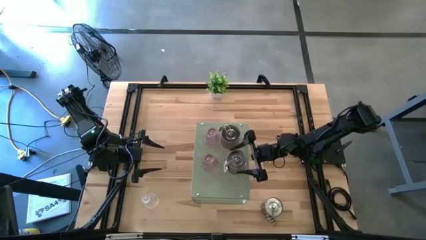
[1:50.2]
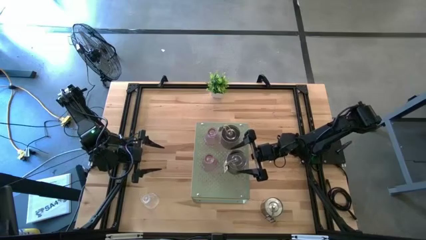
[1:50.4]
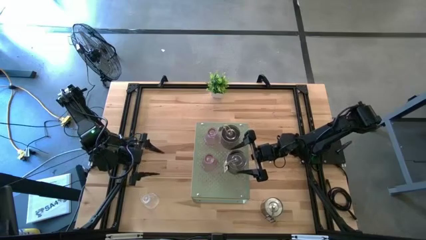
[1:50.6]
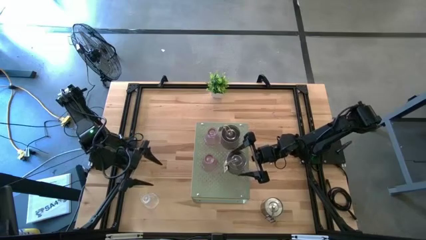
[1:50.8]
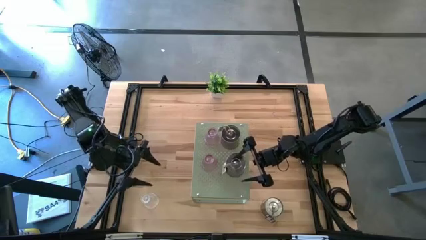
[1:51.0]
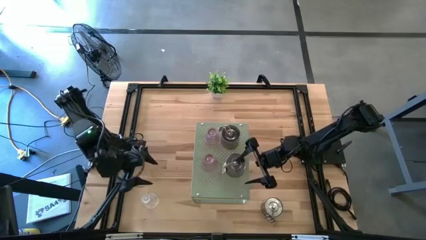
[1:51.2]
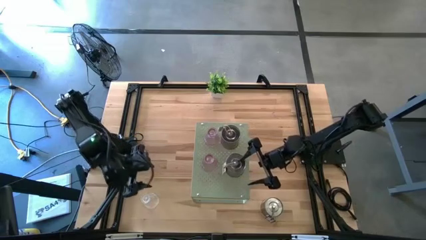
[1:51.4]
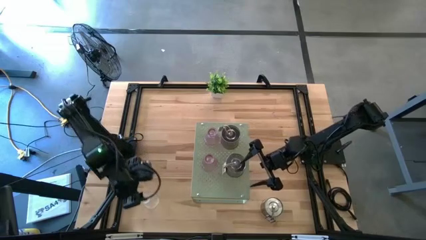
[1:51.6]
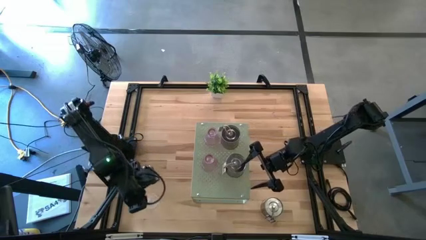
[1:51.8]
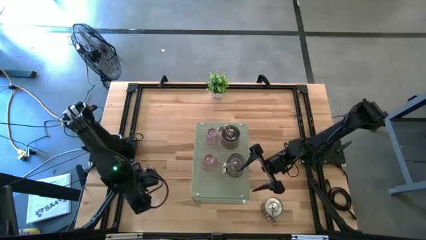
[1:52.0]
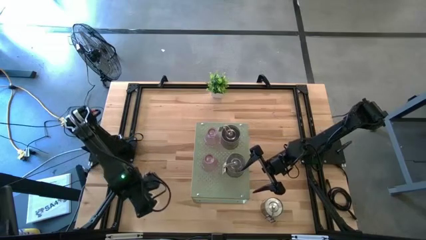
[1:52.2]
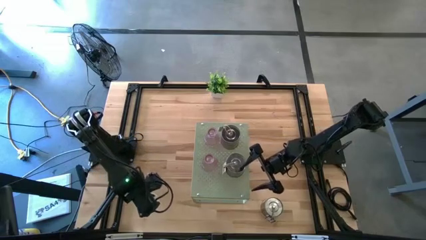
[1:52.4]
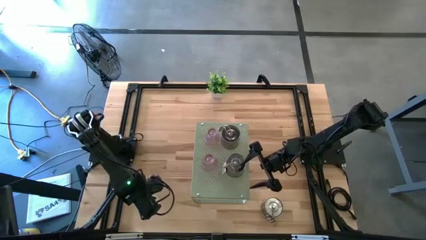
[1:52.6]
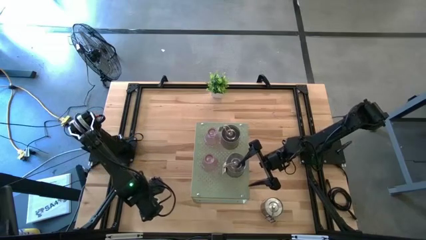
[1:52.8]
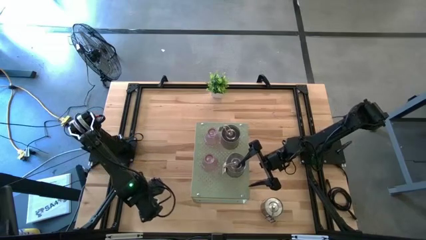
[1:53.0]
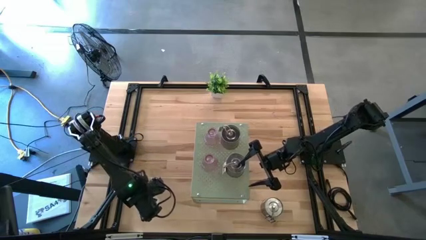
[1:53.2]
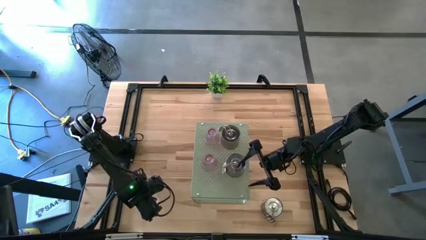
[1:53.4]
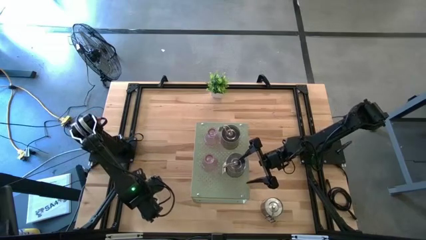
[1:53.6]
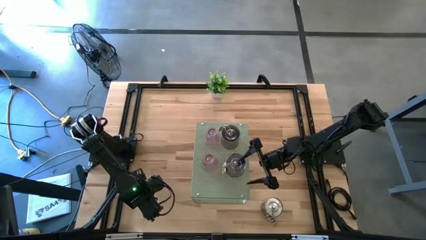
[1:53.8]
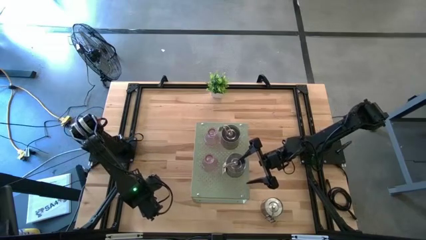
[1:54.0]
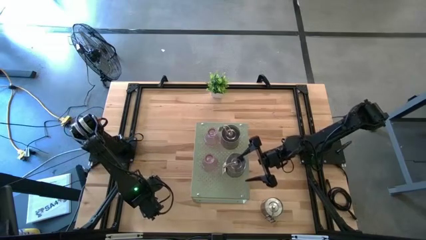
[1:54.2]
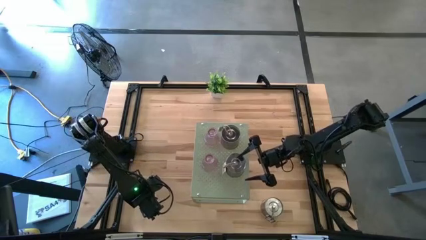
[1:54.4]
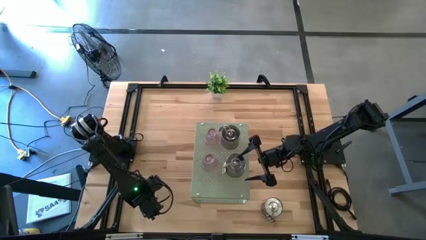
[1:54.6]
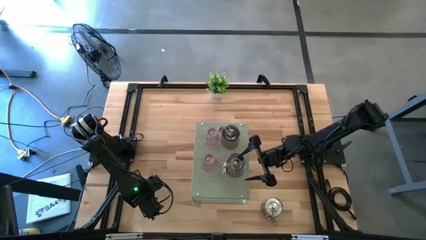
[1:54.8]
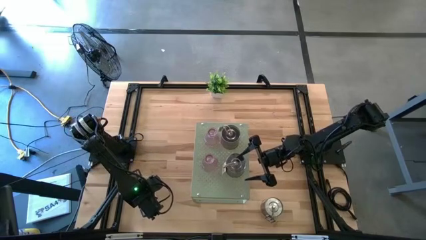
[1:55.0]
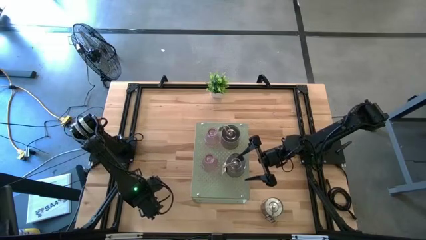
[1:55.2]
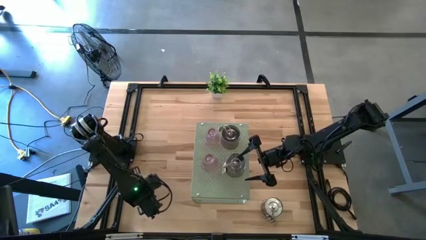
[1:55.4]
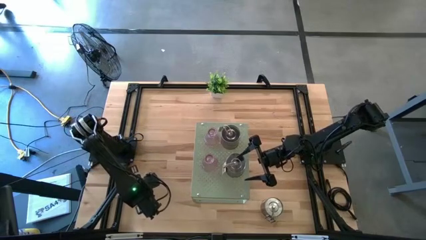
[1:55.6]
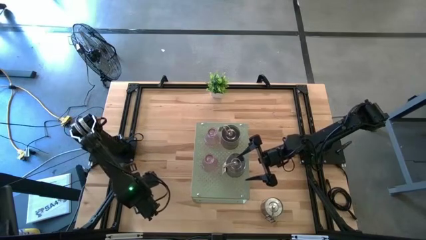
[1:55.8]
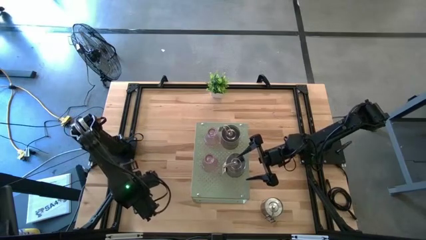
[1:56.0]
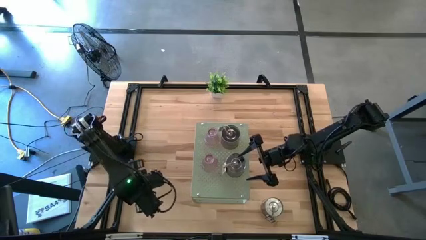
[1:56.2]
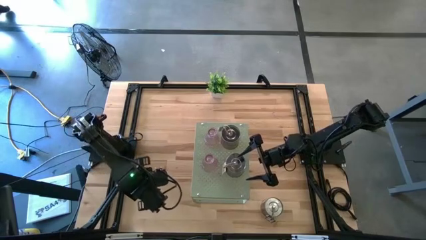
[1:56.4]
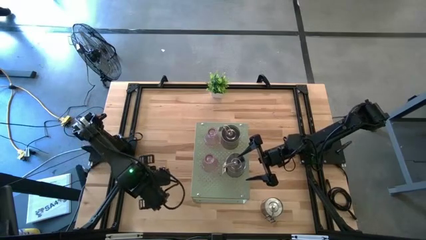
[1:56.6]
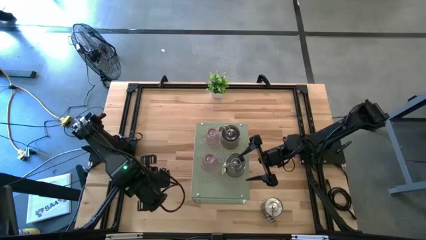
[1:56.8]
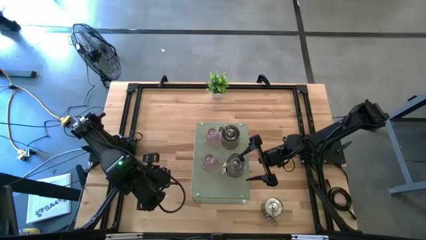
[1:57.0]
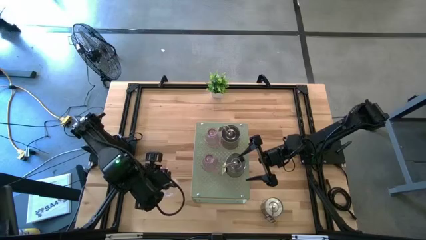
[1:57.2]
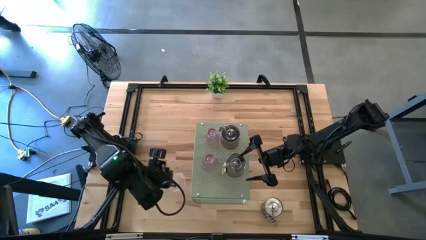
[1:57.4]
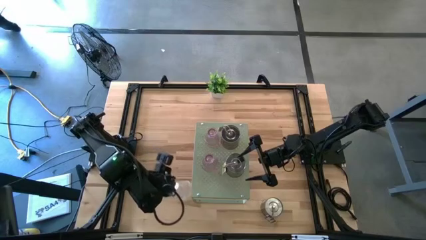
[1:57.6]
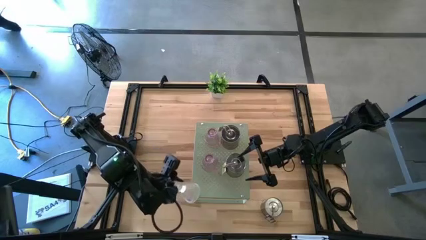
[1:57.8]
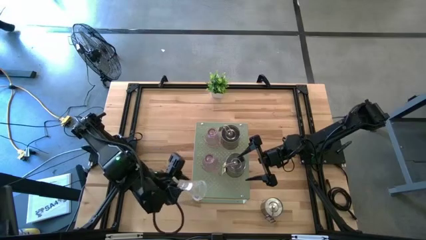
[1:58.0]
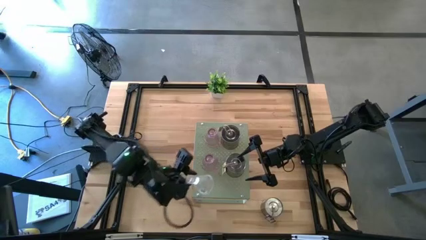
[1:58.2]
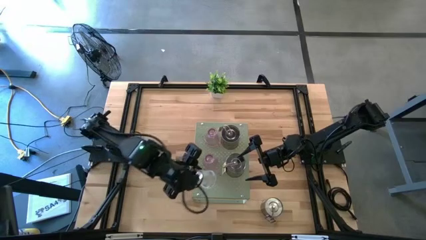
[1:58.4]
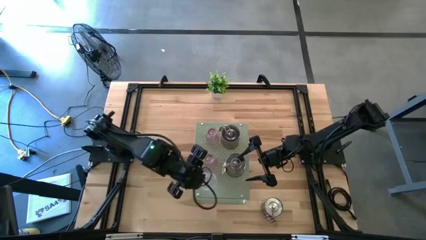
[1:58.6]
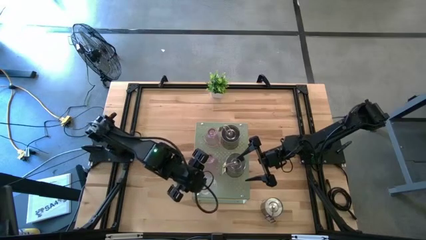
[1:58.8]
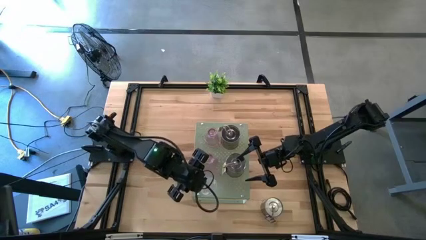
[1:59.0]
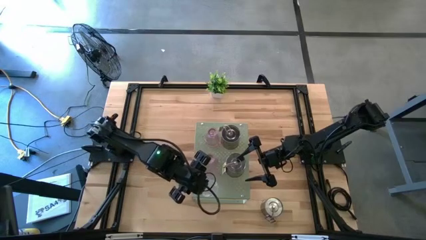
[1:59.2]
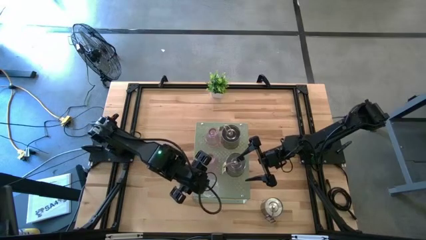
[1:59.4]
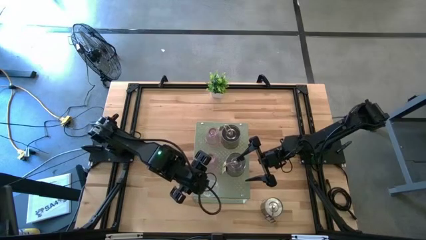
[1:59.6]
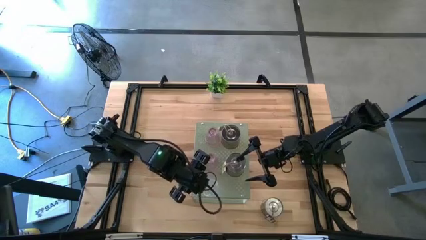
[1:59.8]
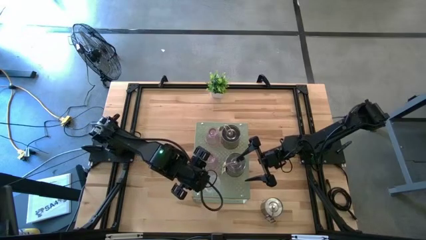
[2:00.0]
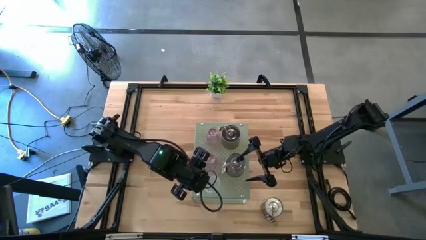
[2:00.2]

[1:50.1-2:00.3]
Task: Pick & Place candle stick holders
Put the transparent candle holder on the shelf

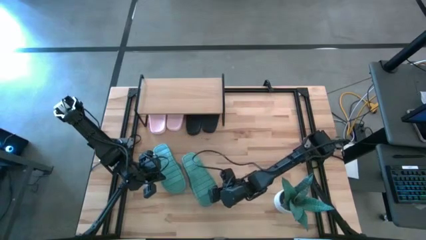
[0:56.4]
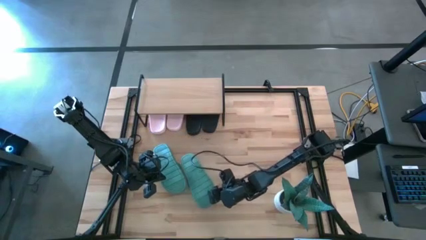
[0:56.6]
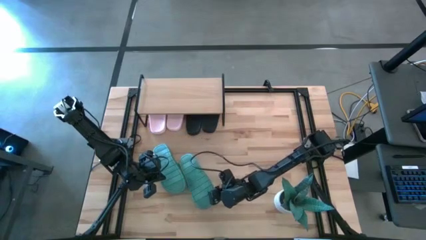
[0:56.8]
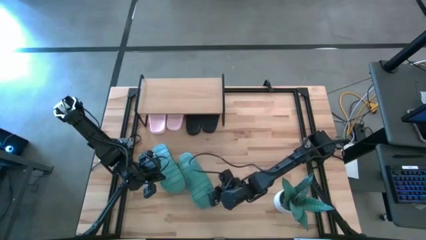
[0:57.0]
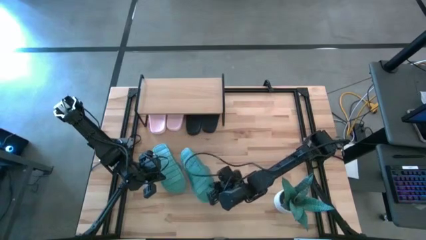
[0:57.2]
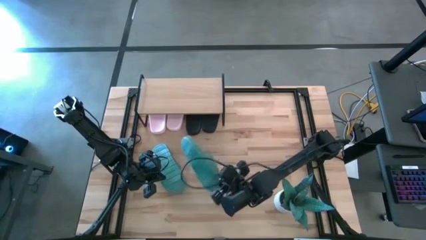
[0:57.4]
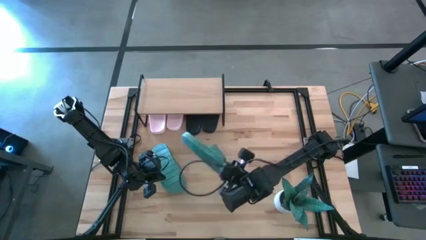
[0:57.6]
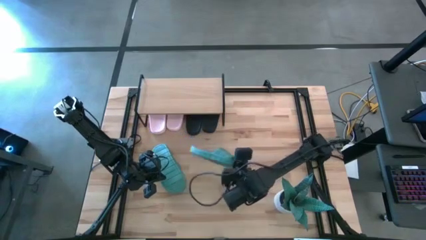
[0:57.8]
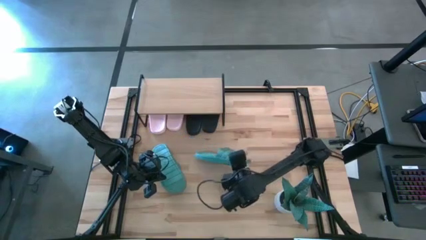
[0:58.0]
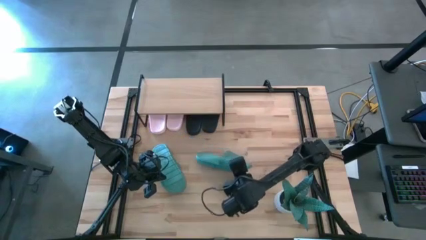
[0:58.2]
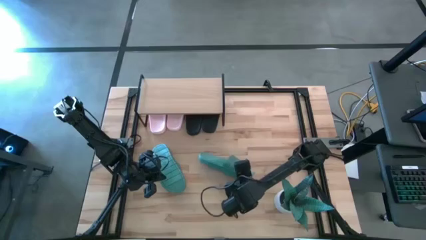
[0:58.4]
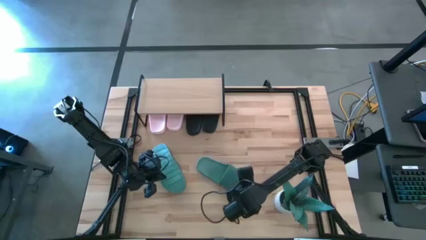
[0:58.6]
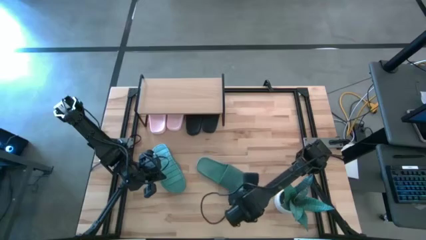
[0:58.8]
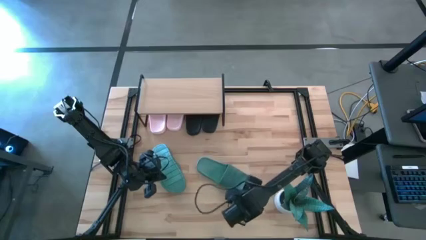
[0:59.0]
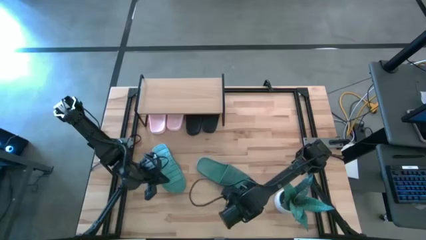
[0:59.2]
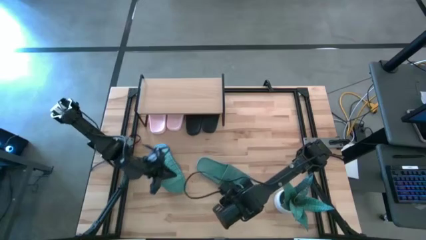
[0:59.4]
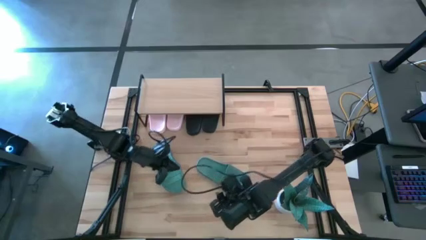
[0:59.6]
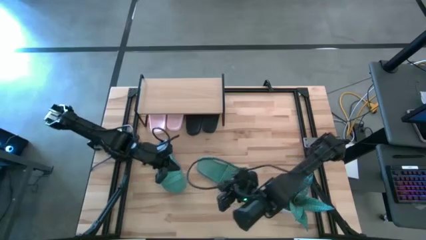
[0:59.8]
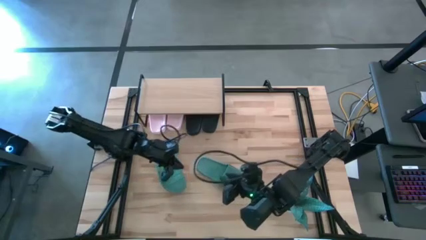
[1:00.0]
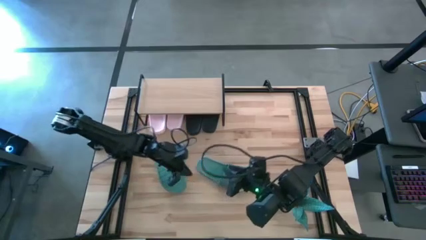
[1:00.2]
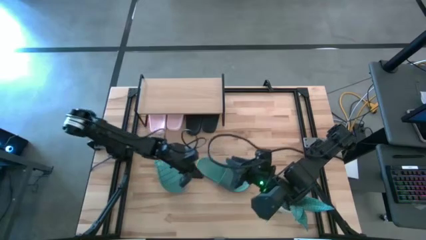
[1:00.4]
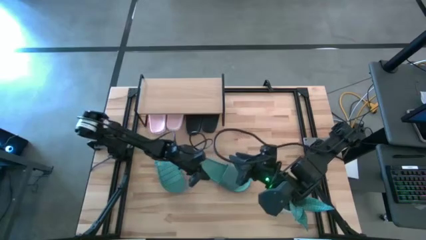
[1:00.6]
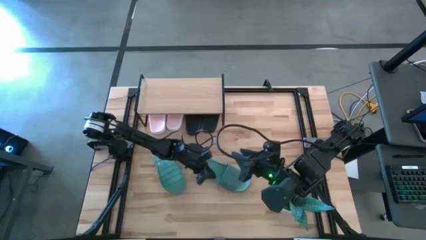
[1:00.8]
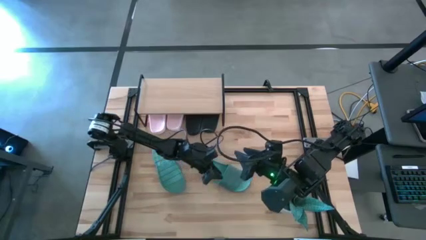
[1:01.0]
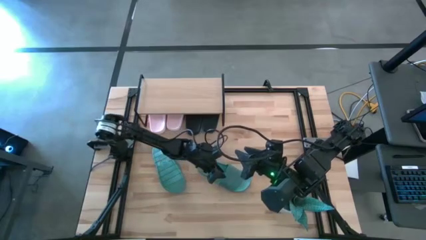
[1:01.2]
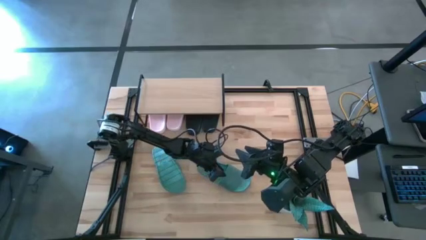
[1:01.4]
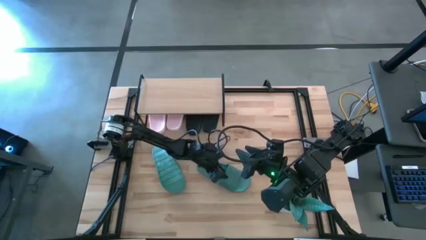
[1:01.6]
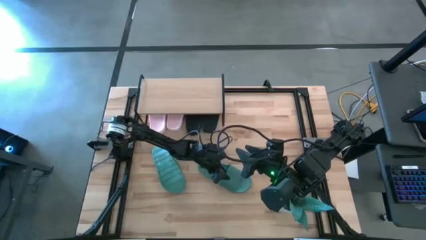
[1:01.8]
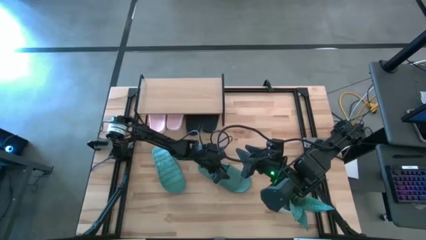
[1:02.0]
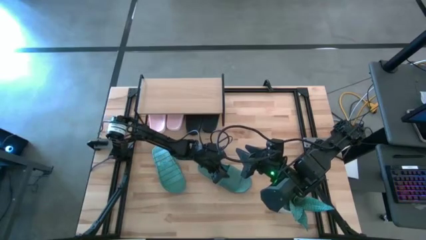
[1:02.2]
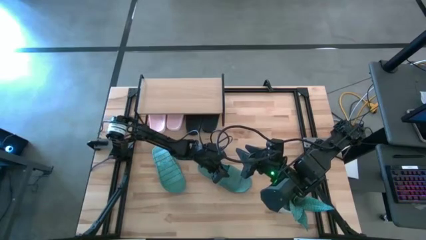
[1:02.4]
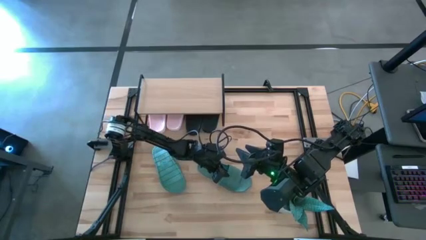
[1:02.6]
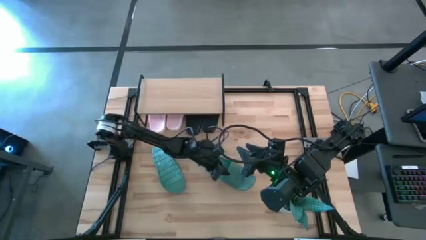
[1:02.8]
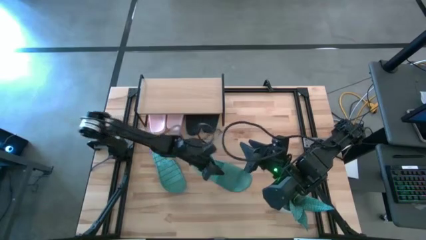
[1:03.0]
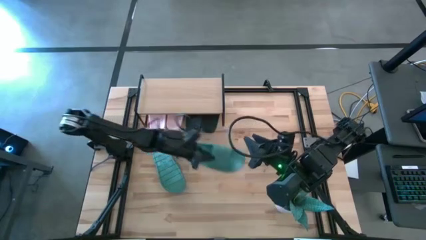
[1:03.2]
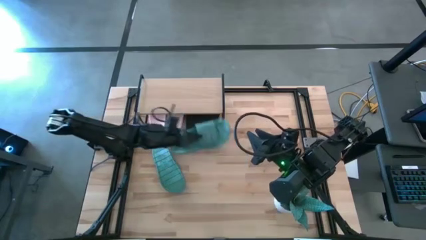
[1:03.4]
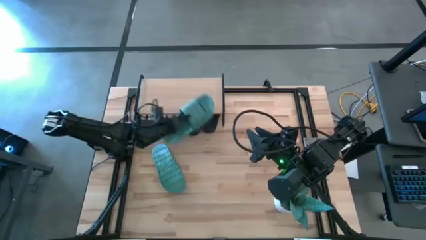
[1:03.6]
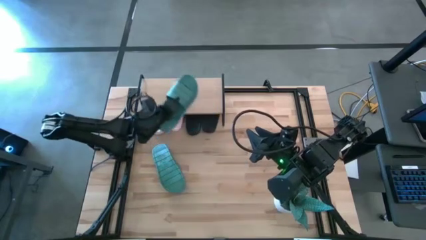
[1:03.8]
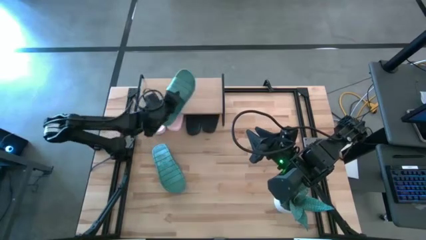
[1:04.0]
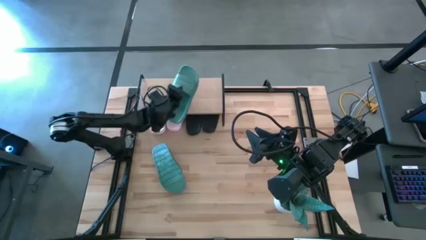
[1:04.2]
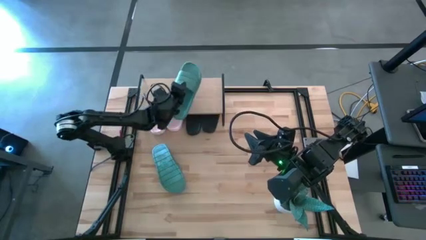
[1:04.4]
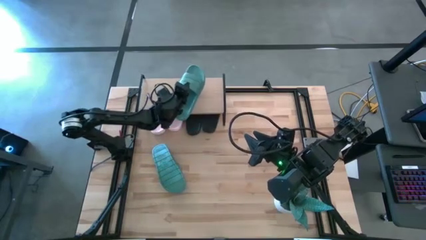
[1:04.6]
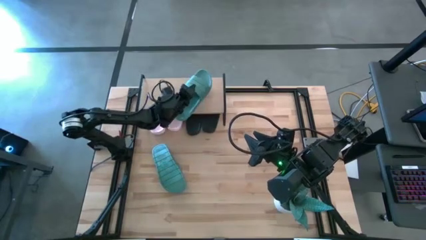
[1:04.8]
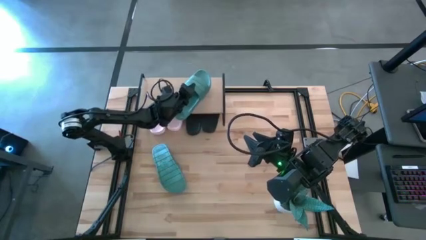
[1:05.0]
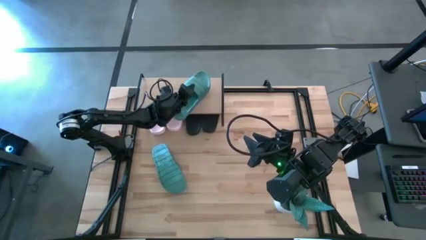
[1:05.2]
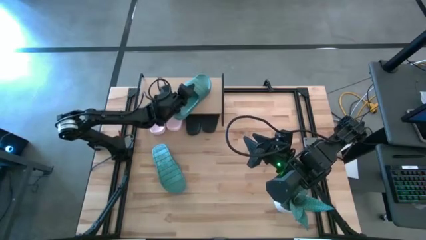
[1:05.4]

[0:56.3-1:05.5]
Task: Pick and place slides into the shelf
Put the right green slide on the shelf
